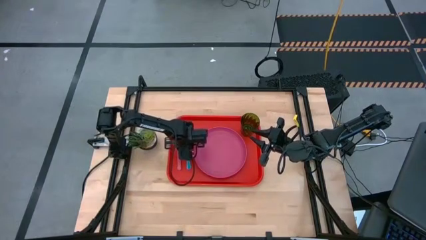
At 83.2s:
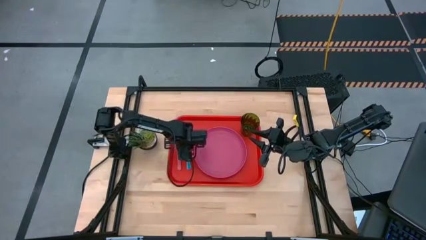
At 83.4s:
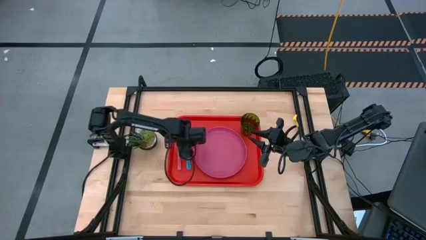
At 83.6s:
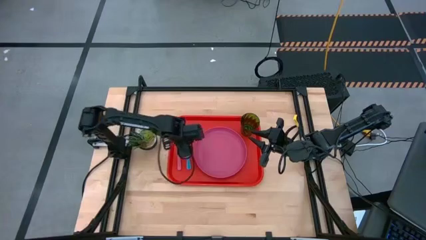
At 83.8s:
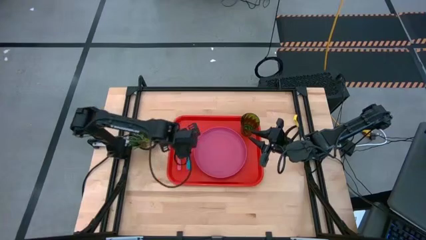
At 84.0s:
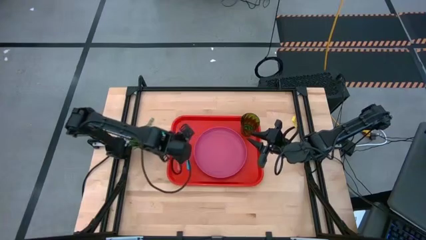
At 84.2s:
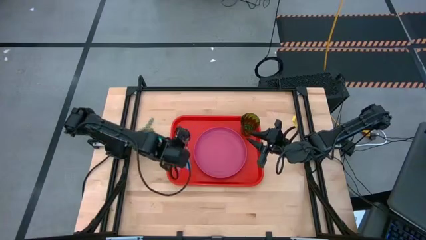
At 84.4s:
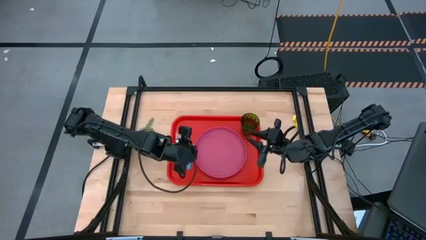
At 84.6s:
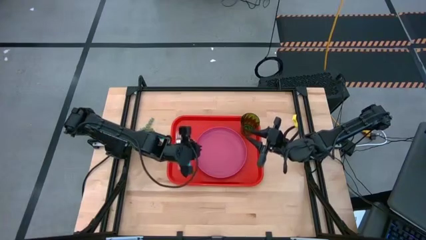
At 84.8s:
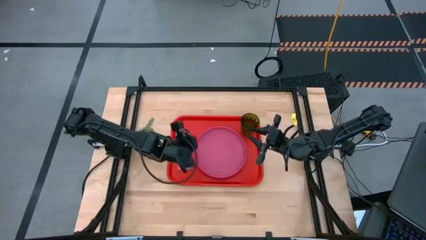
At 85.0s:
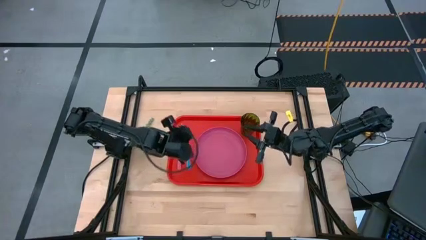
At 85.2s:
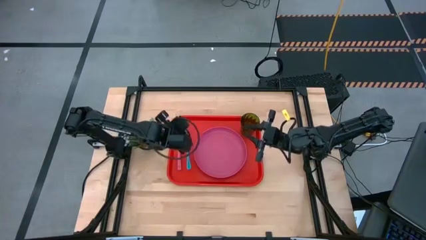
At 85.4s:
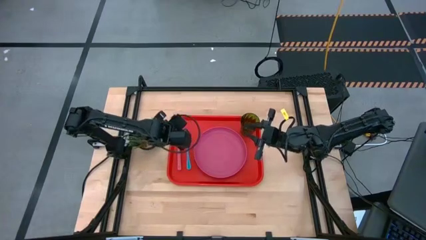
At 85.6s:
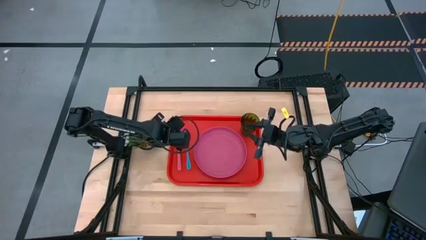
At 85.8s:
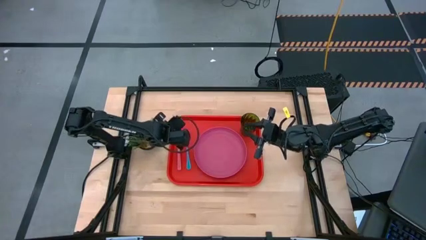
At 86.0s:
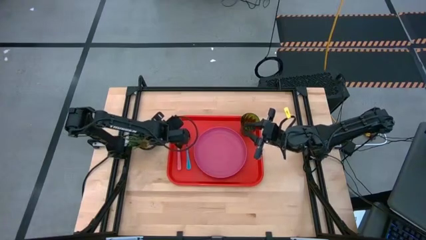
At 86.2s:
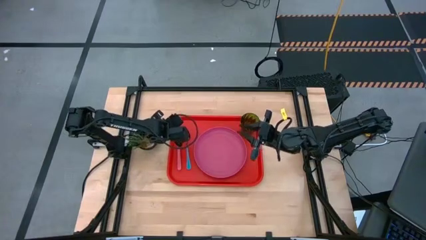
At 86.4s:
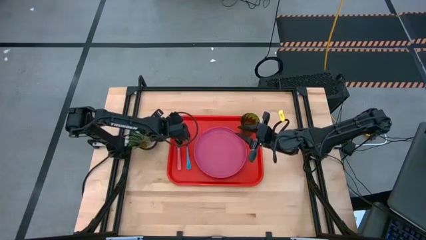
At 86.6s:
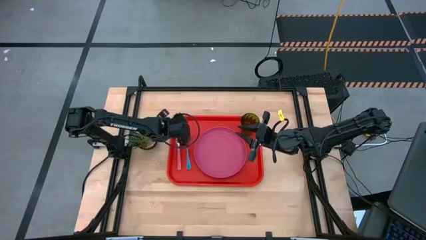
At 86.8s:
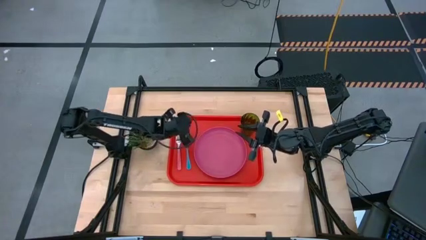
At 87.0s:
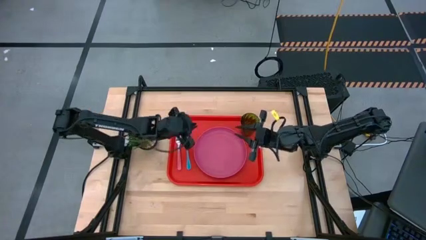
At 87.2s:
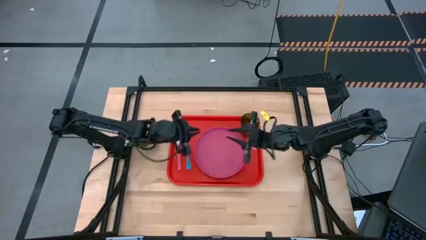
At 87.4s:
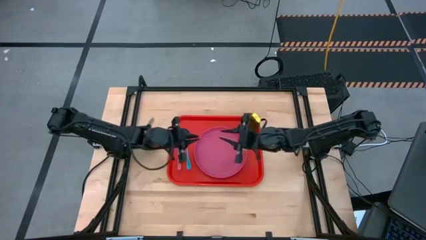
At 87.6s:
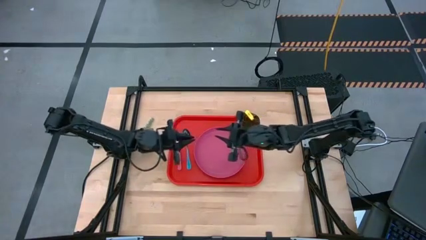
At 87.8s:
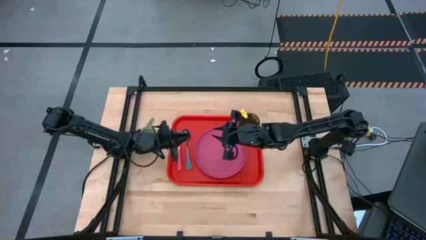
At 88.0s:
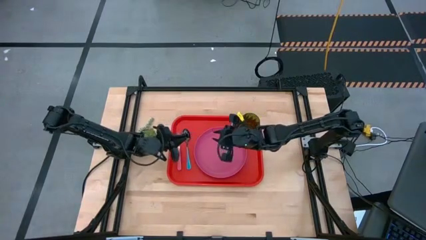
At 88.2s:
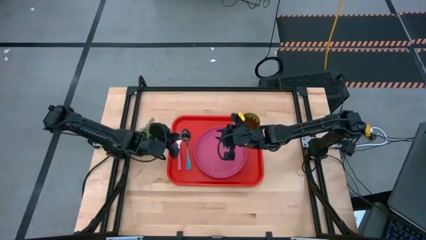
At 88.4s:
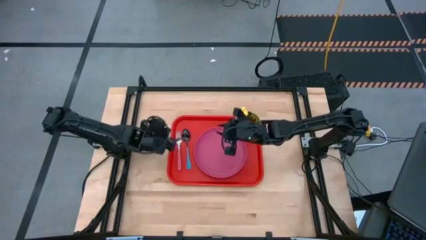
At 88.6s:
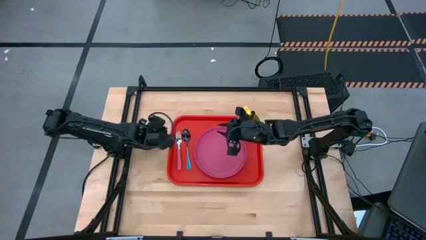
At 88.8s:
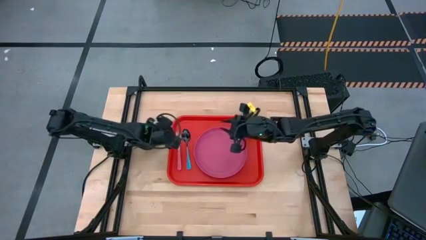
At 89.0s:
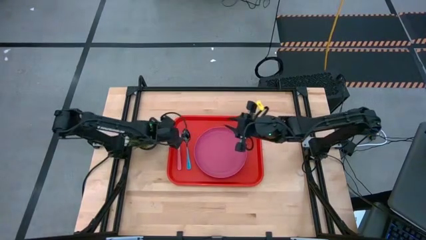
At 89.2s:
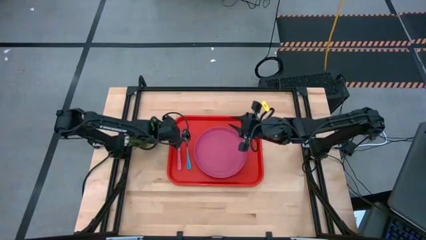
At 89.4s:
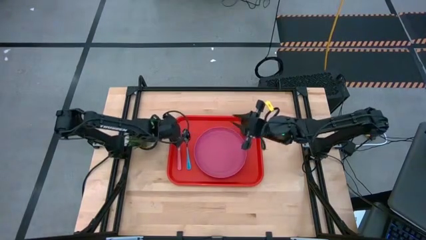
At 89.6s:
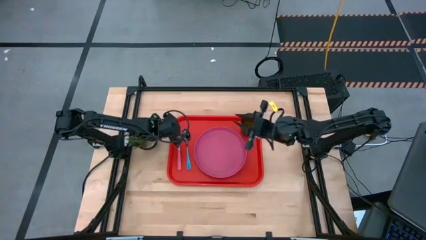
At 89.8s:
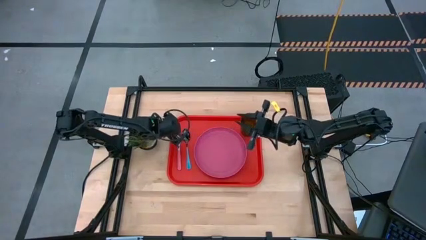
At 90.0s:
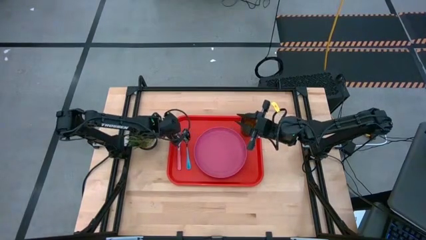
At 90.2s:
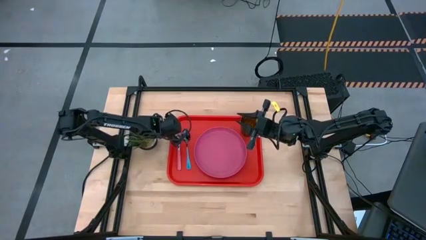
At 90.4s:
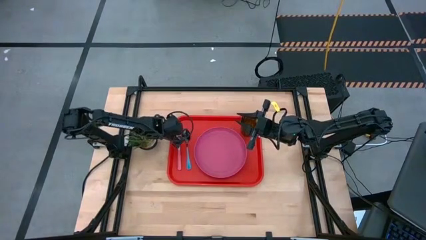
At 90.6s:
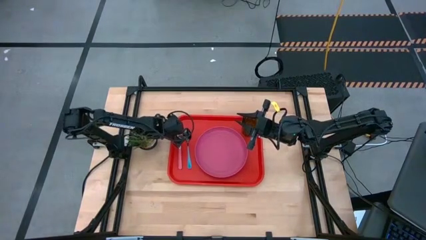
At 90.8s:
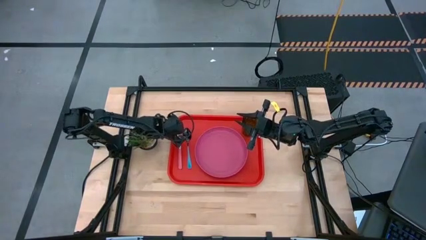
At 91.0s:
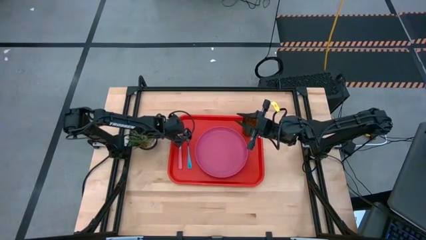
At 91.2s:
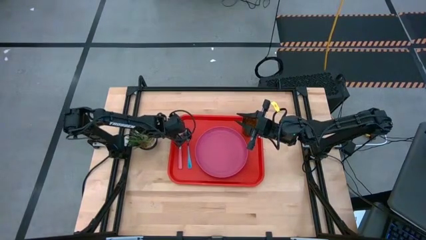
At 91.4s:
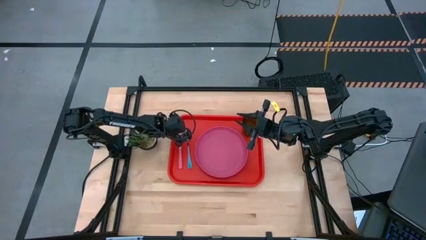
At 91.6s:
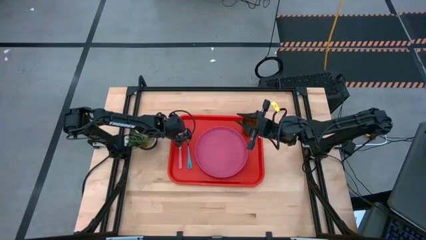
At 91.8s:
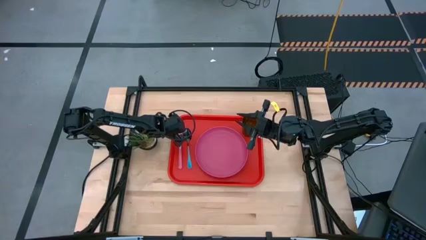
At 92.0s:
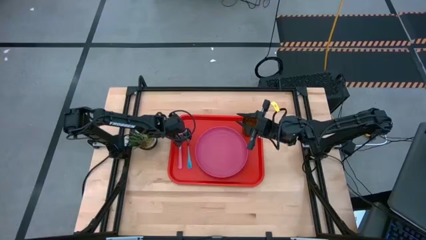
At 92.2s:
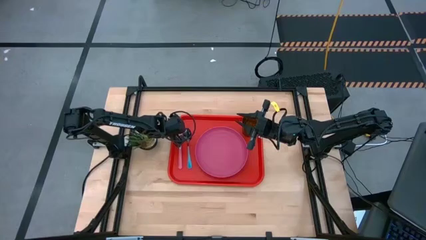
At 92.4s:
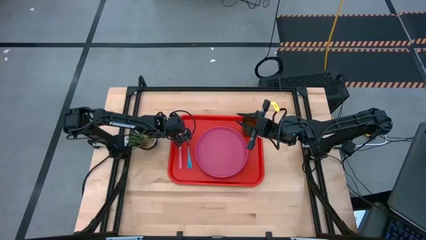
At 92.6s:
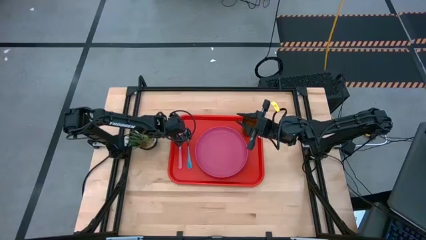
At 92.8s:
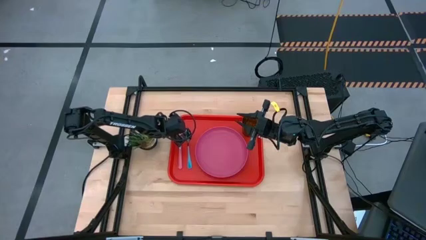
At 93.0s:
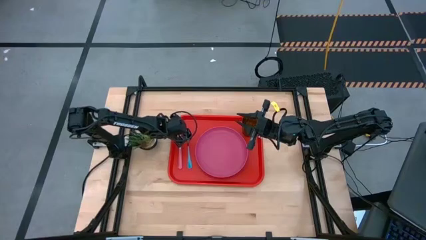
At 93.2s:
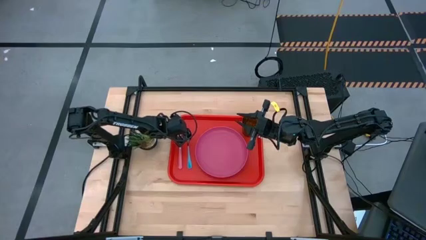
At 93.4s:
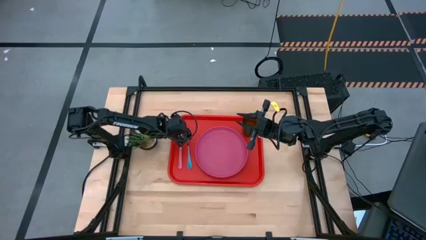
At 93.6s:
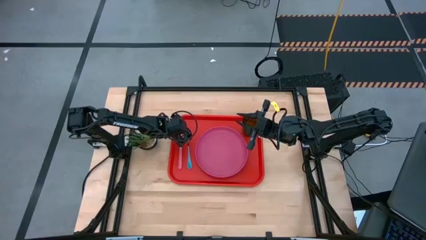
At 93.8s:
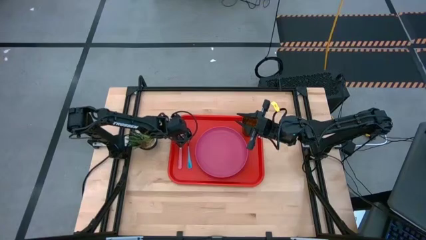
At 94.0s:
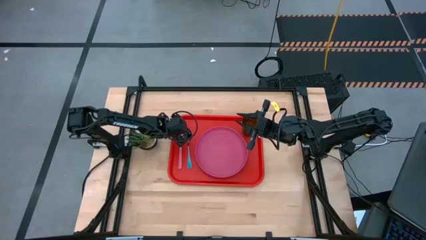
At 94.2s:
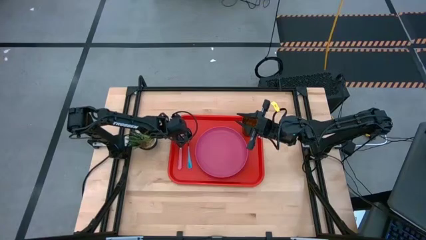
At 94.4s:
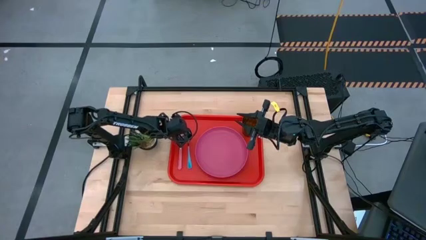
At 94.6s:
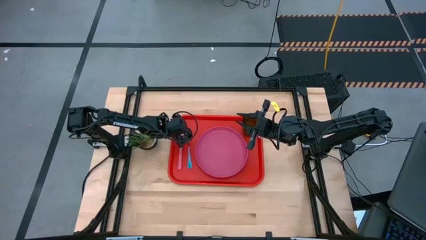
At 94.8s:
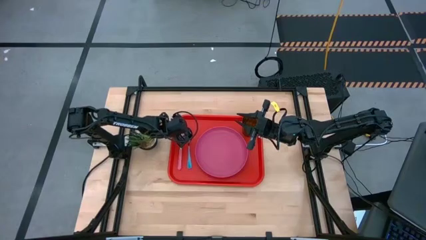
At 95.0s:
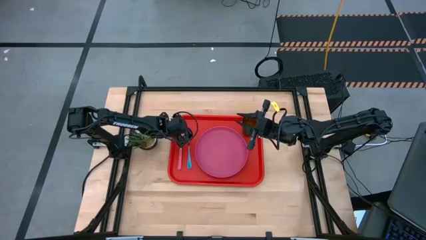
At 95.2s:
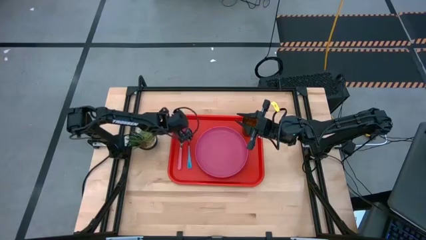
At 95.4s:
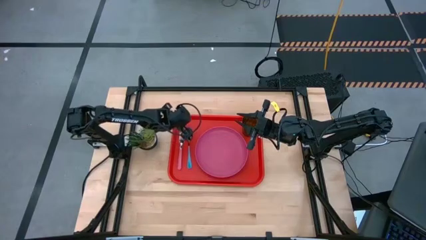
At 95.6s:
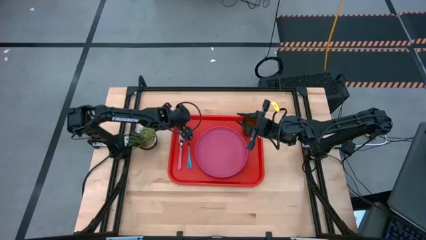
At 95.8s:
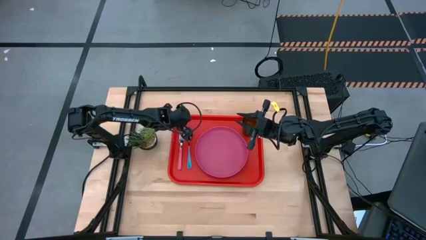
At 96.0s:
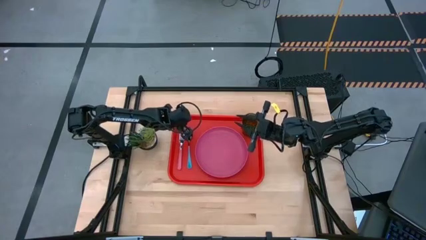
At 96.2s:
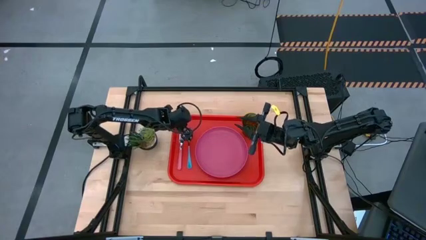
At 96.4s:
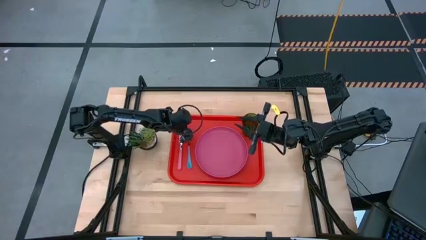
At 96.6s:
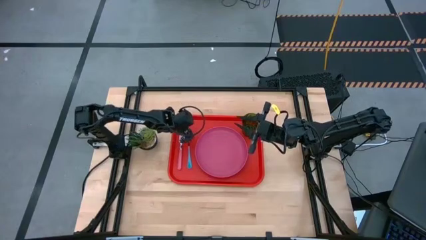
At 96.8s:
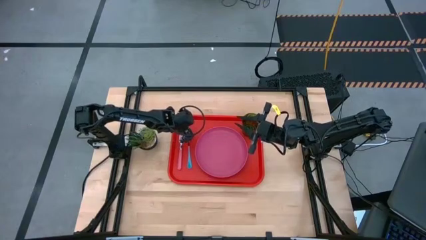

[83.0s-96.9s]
Task: Pick and place plate/cup/fork/spoon on tray
Adjust the silverware on the red tray

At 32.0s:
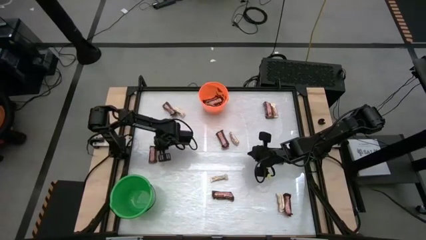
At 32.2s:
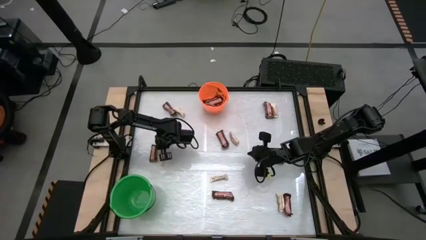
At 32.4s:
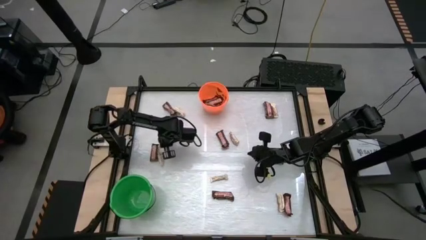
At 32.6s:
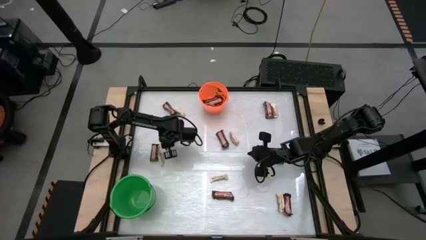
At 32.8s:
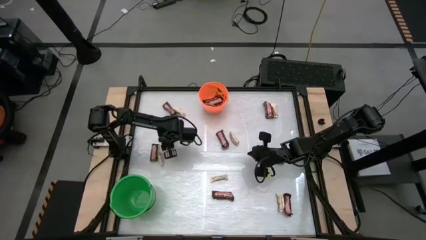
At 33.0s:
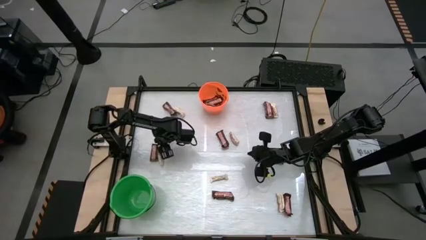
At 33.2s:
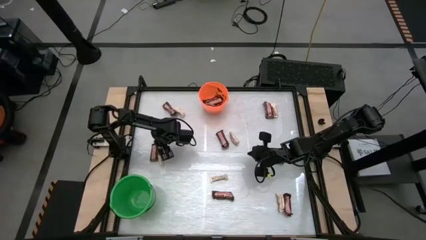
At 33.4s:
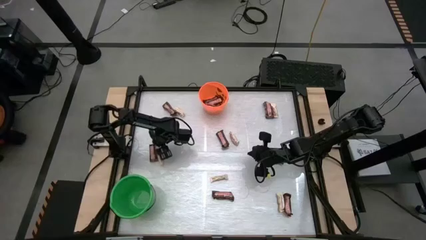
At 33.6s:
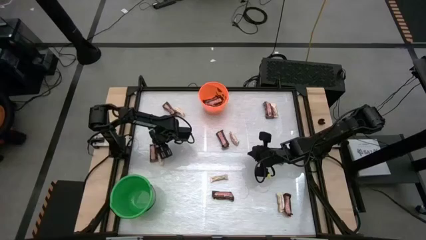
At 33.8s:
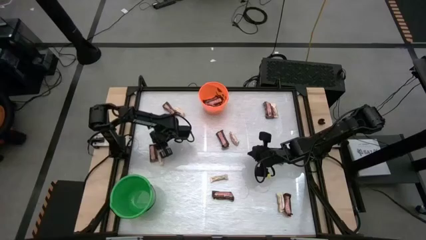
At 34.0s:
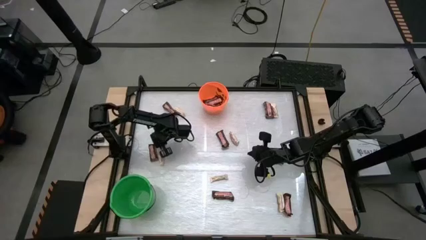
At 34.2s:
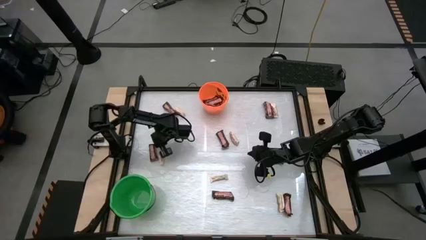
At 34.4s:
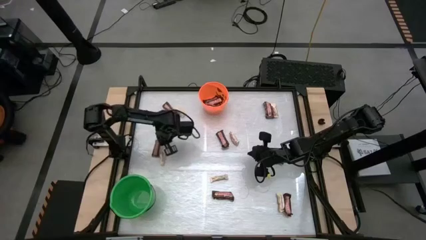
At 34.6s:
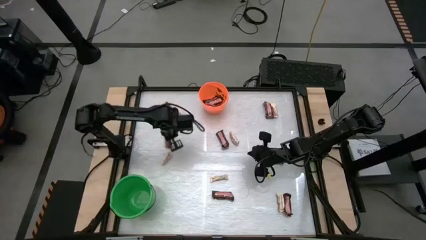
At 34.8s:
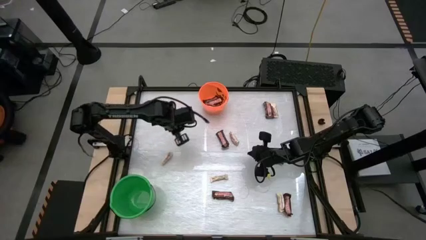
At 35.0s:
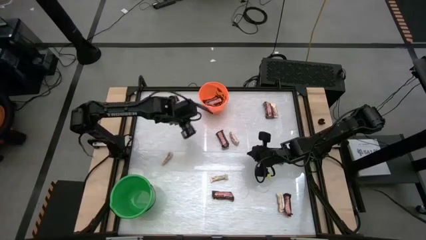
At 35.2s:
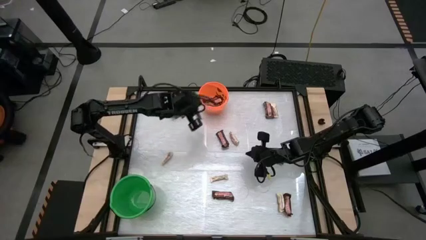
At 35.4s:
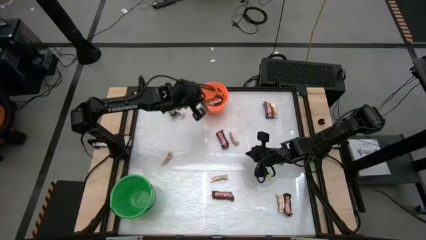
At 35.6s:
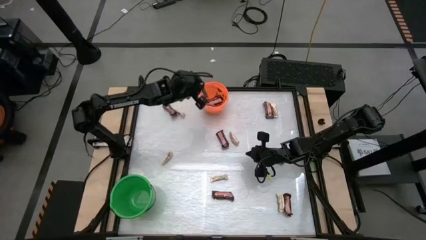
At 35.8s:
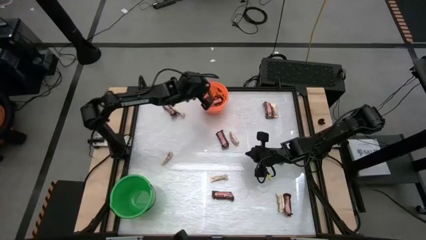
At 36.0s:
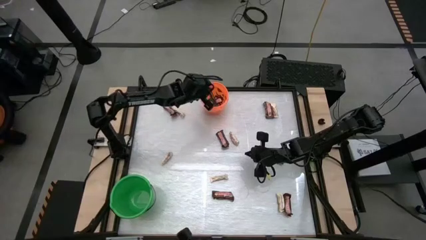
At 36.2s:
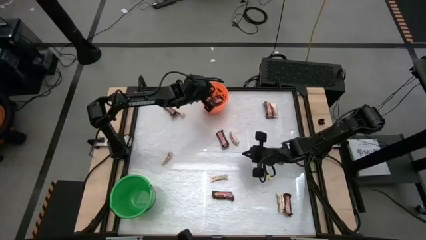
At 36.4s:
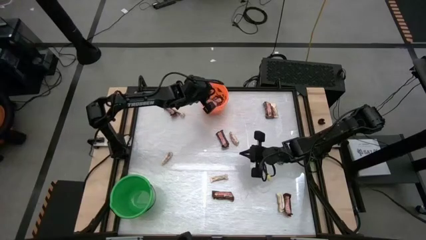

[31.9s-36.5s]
Task: Sort candy by brand, put in halloween buckets
Put the brown chocolate bar into the orange bucket
